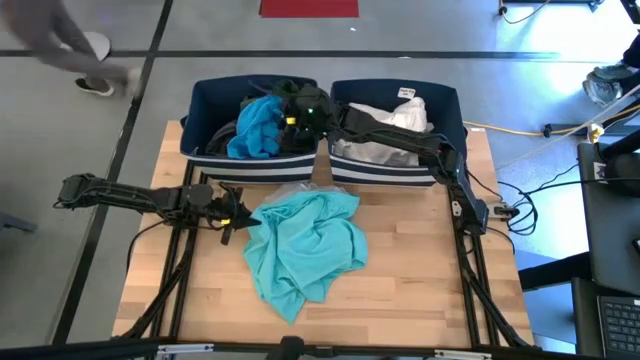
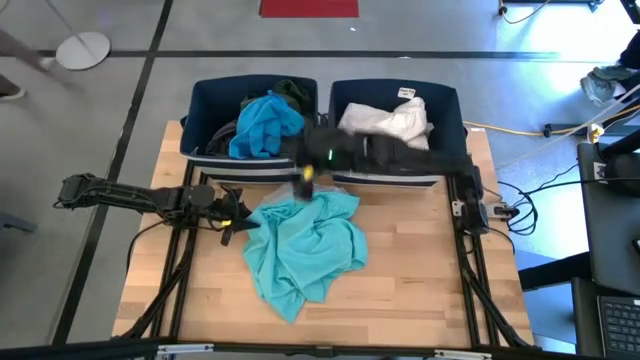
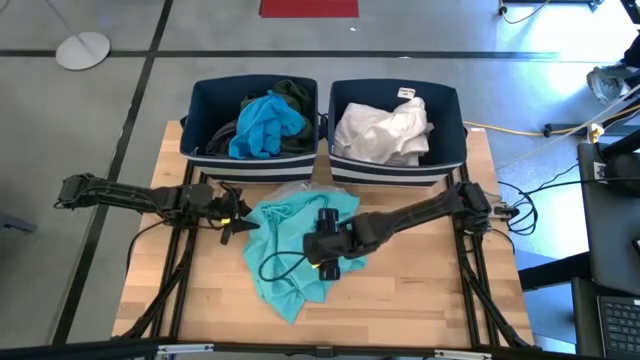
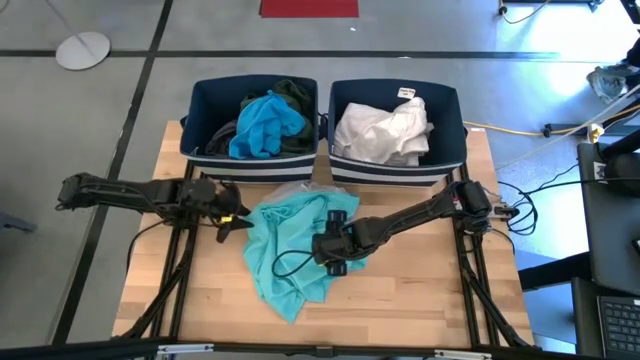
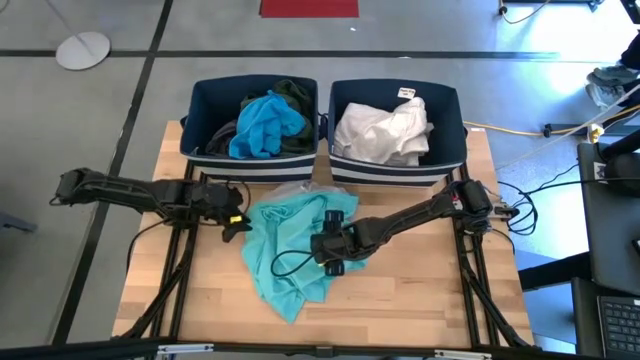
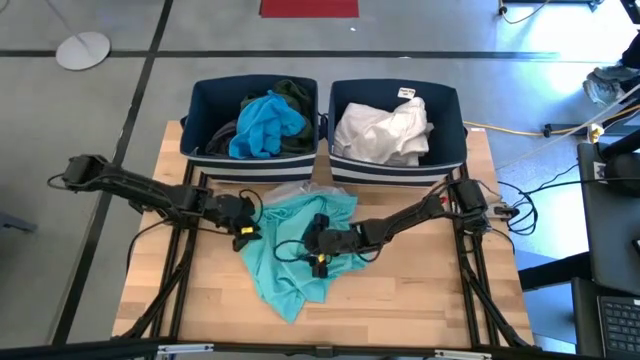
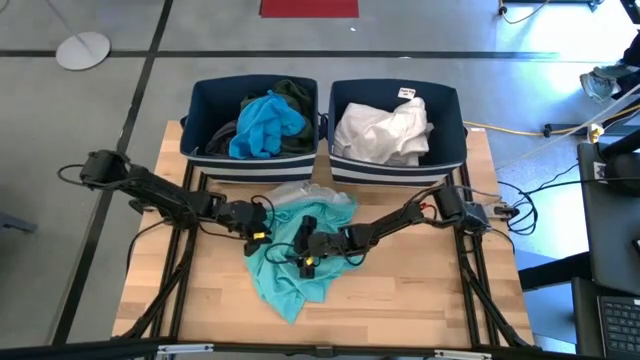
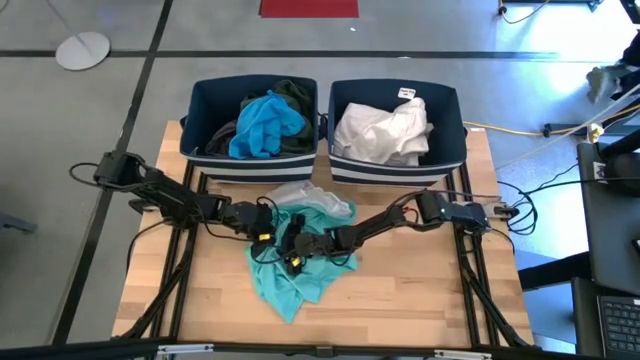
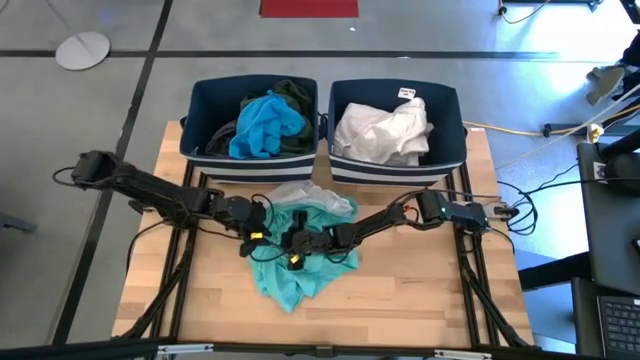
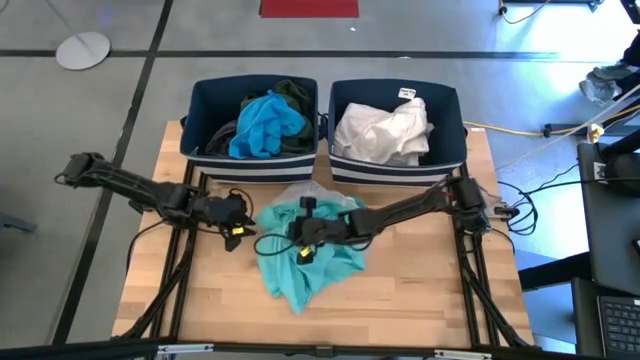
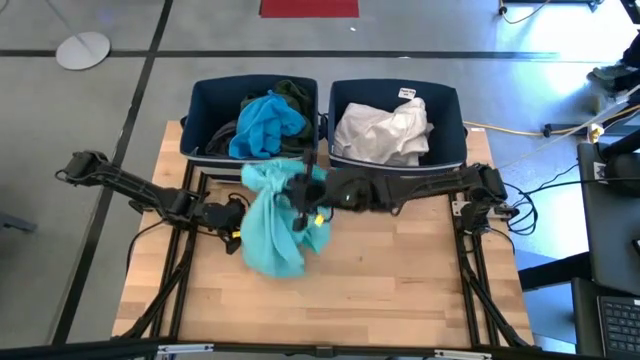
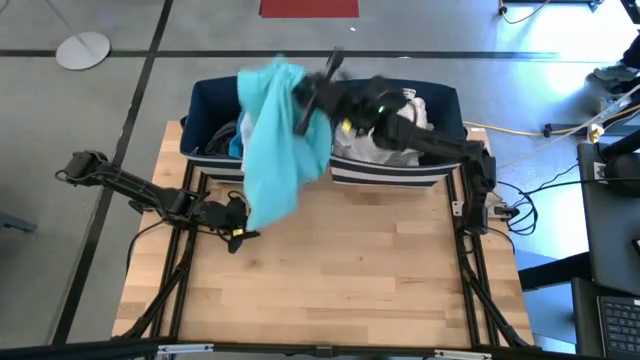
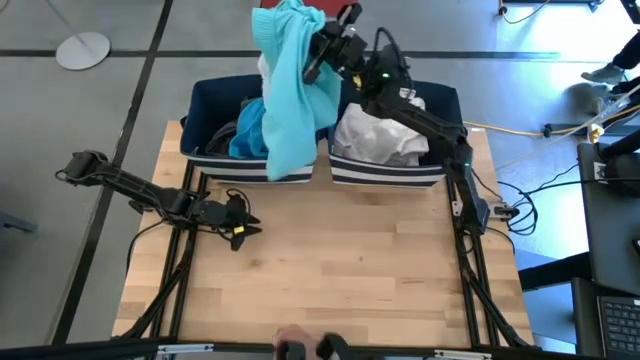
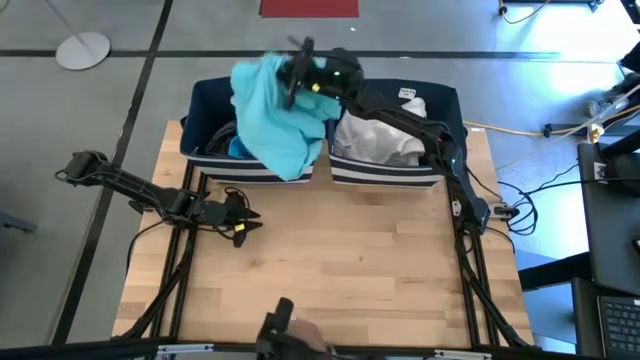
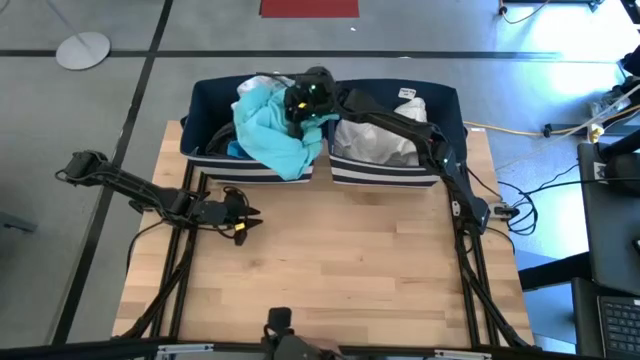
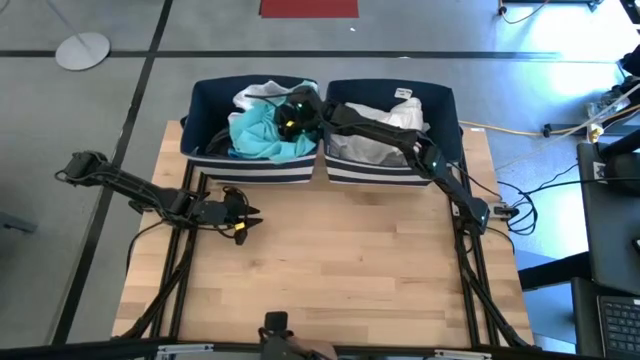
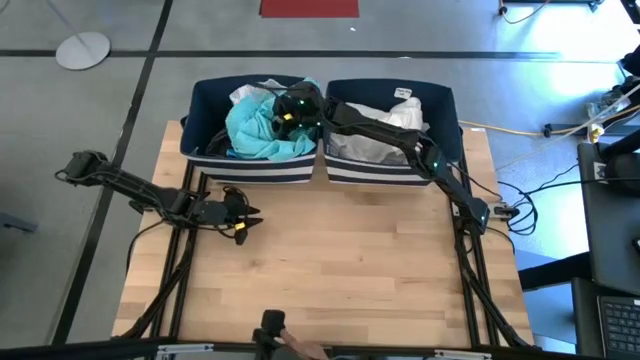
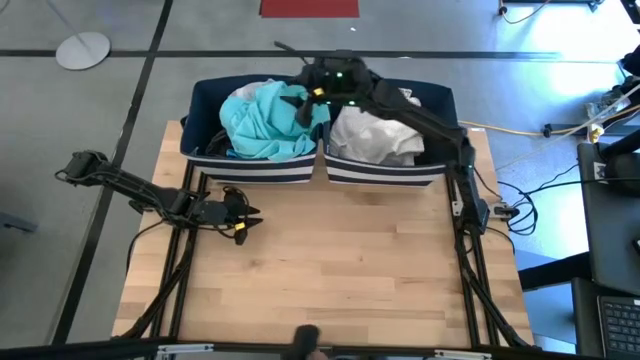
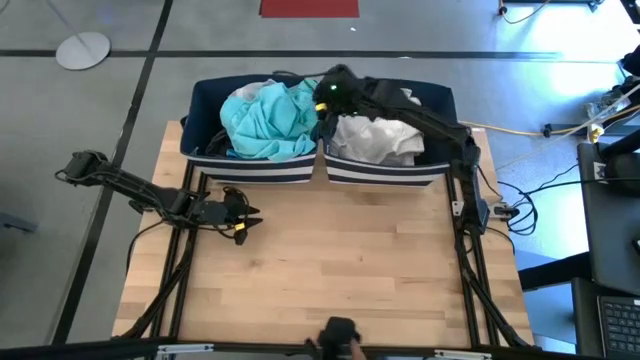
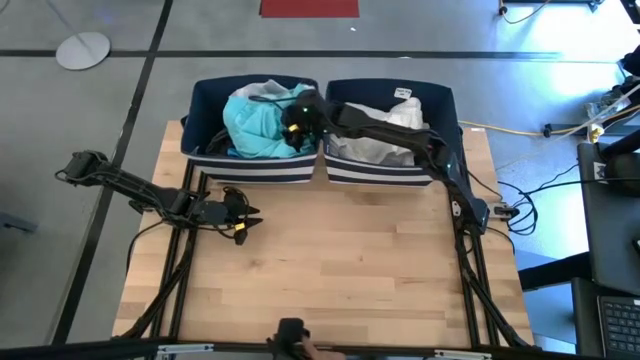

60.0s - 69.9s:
Task: Sort clothes
Put the light blue shorts into the left blue laundry bin

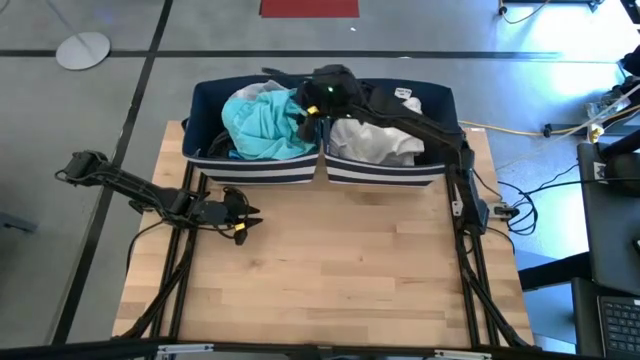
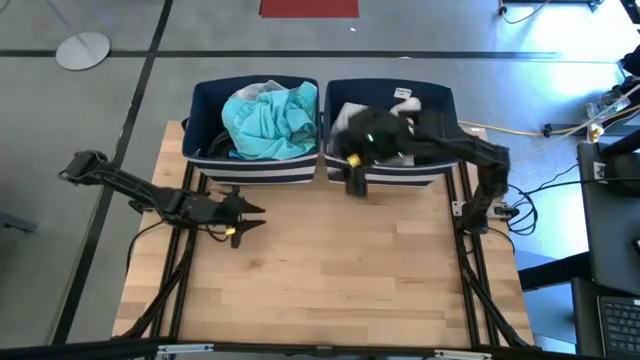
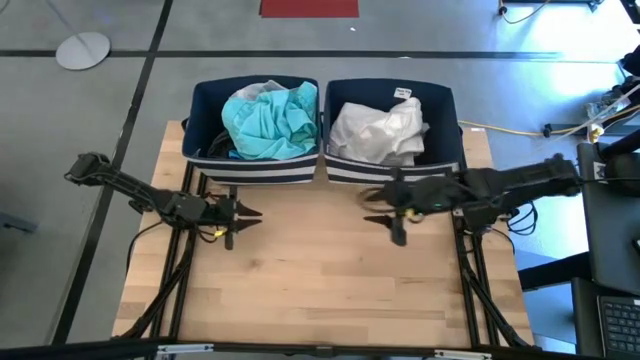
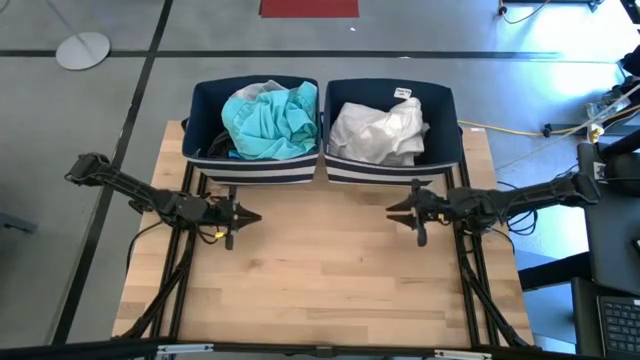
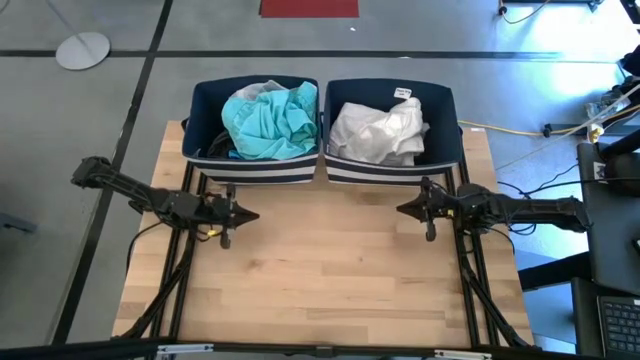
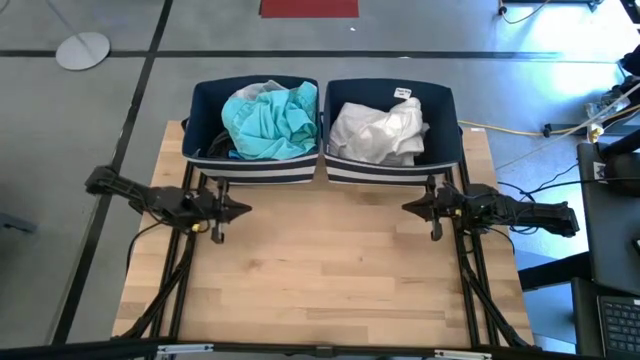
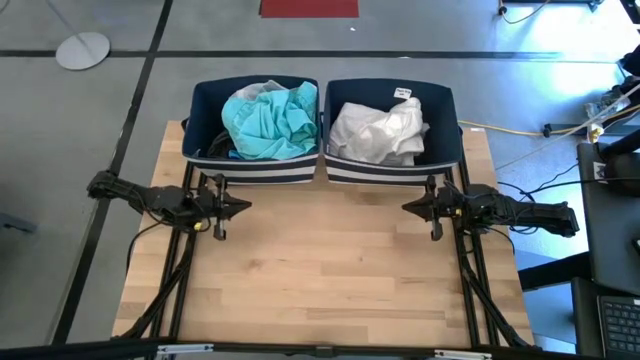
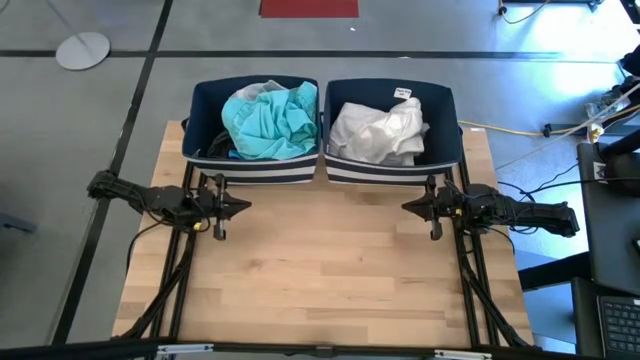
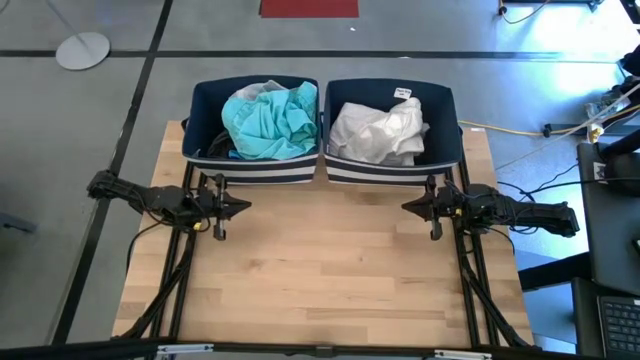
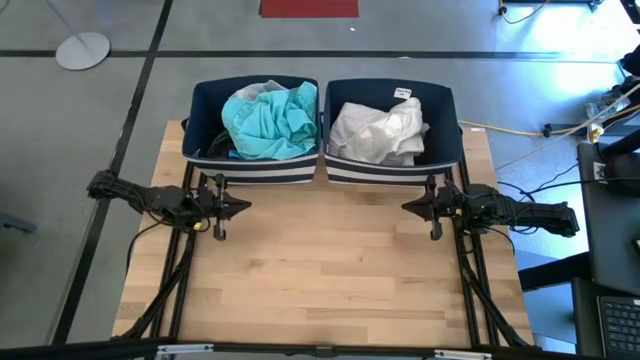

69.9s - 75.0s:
Return to Home Position

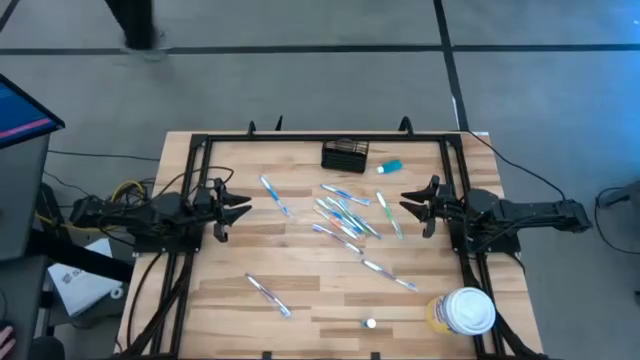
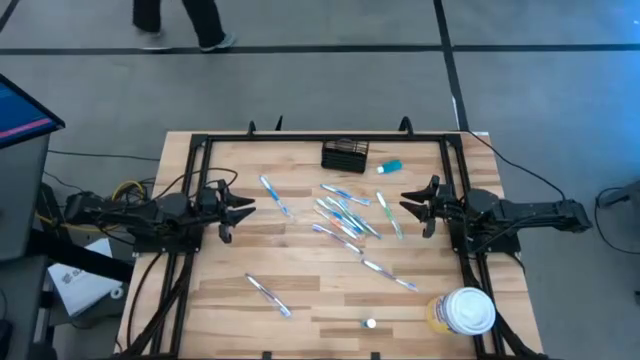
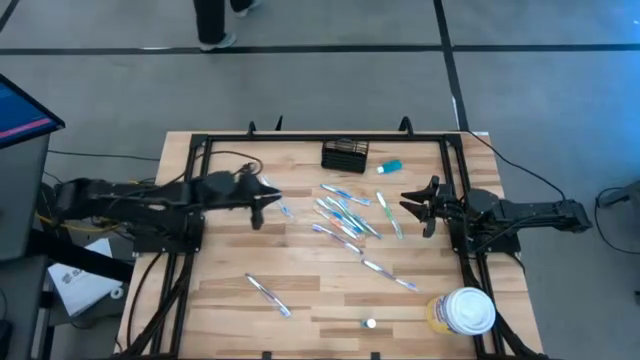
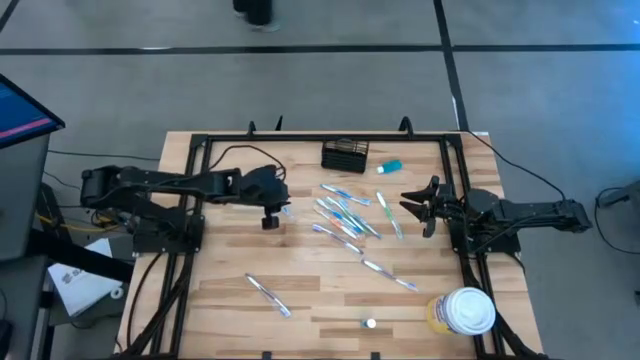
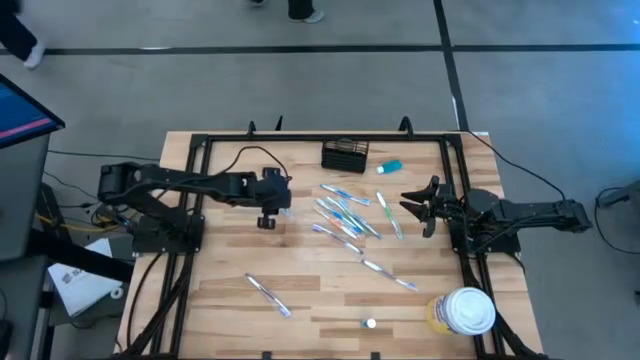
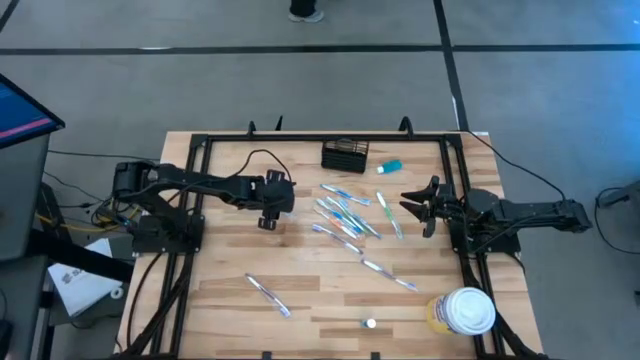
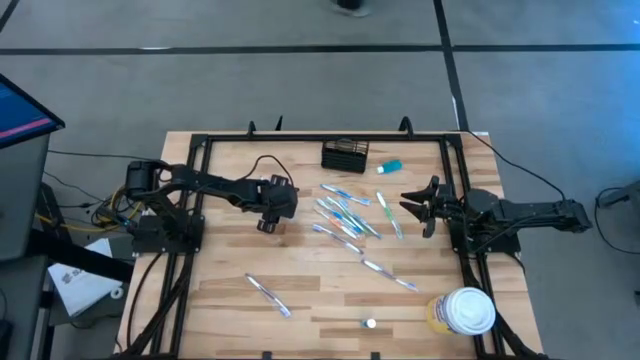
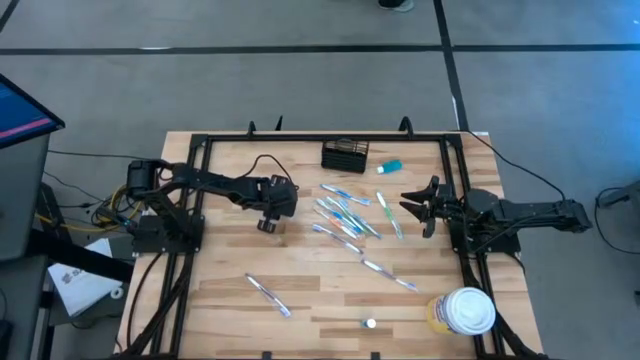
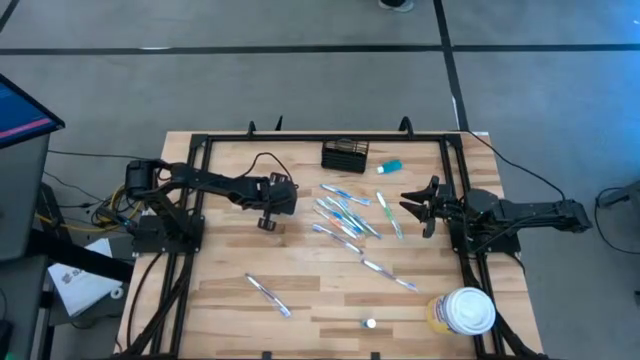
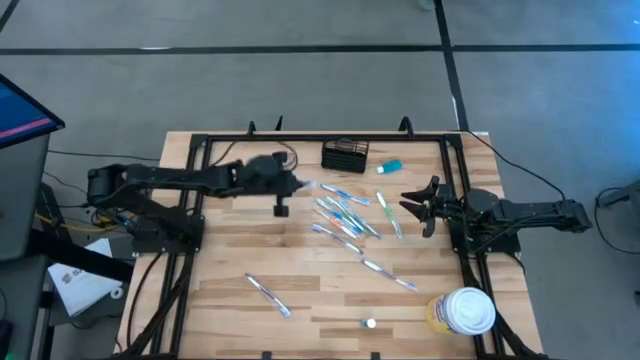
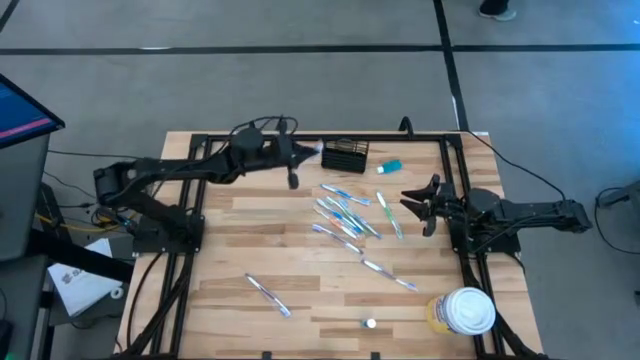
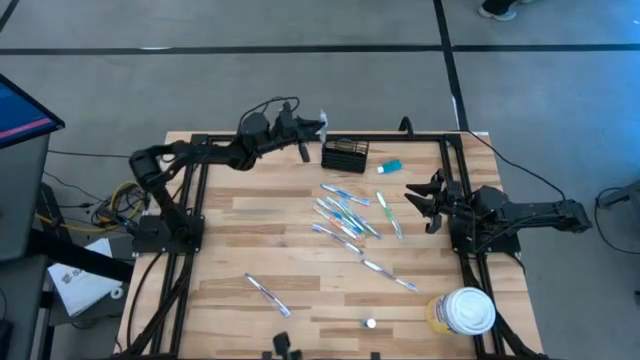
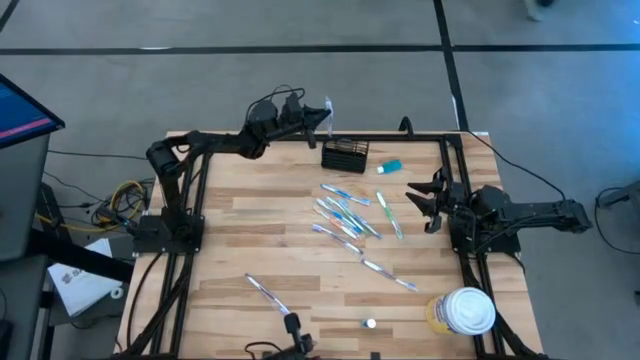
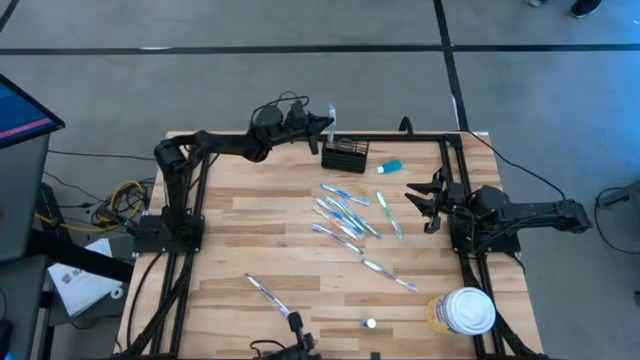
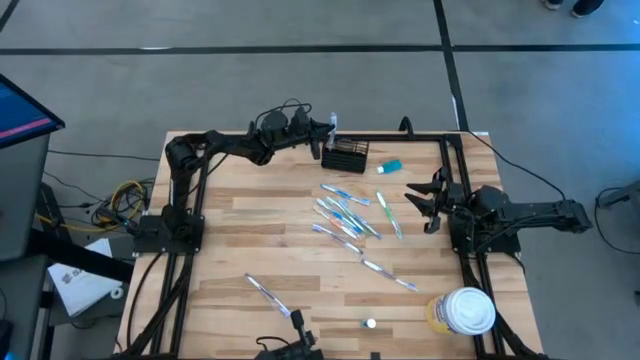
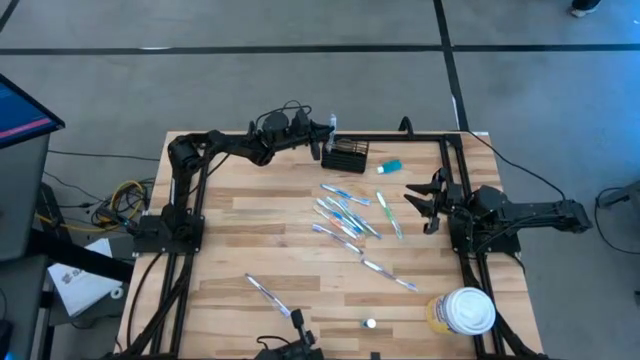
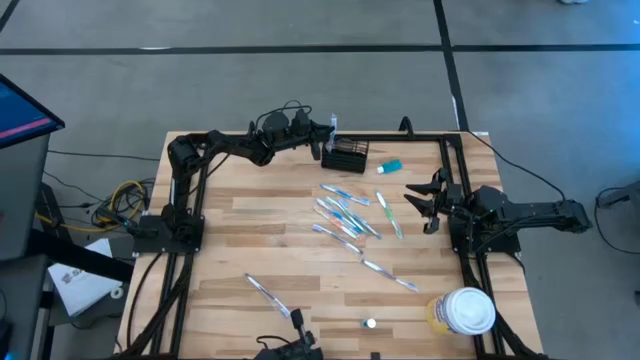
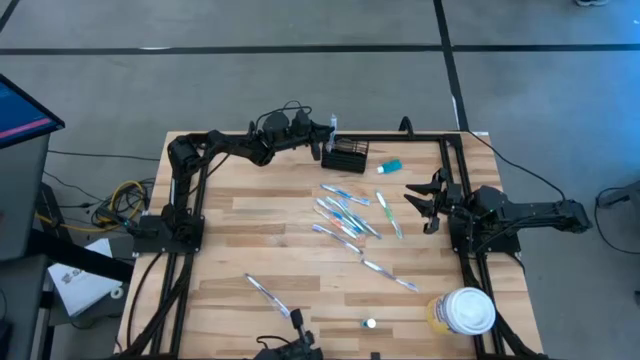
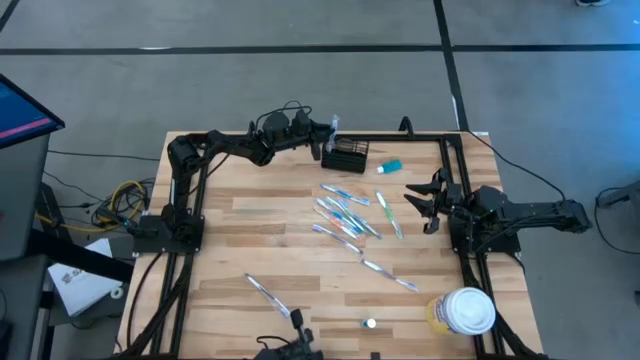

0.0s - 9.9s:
Task: Pick & Place toothbrushing station
Put the blue toothbrush into the mesh organizer
